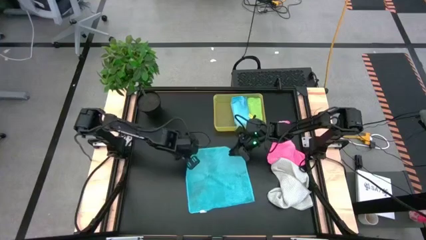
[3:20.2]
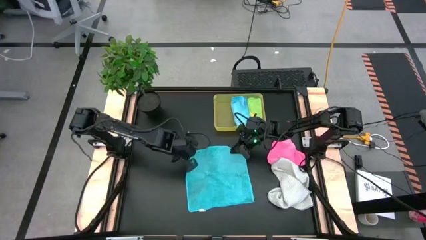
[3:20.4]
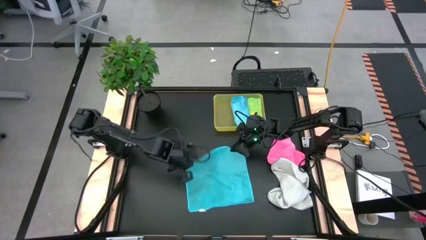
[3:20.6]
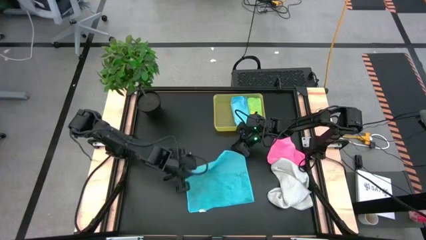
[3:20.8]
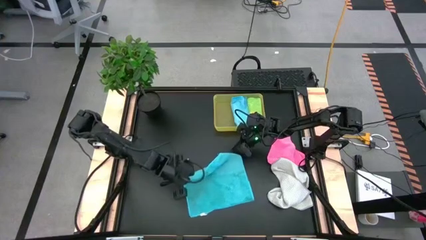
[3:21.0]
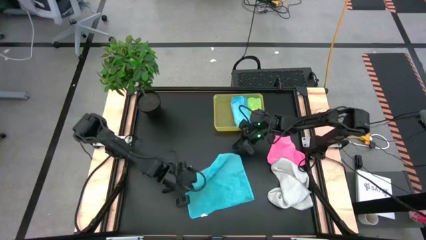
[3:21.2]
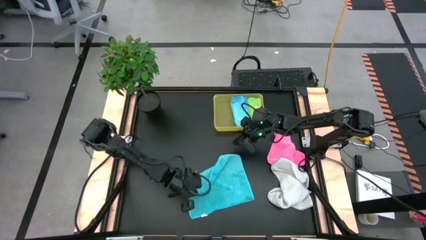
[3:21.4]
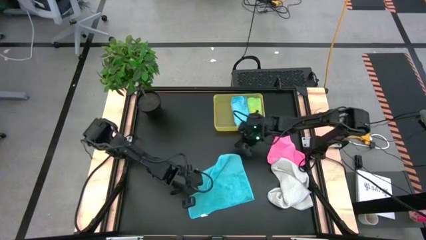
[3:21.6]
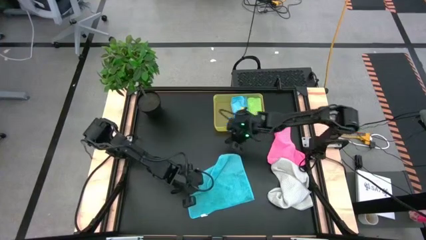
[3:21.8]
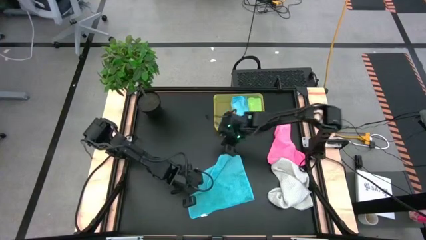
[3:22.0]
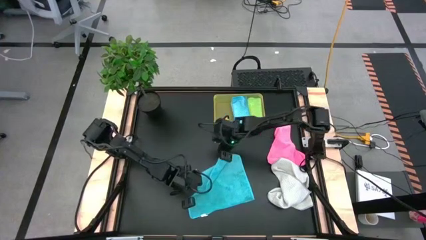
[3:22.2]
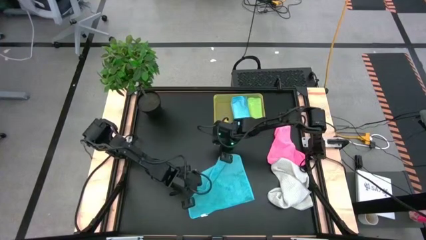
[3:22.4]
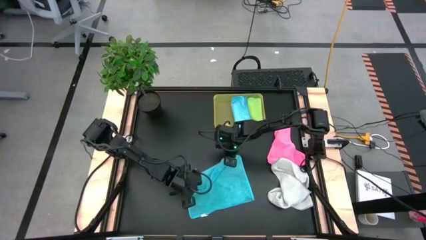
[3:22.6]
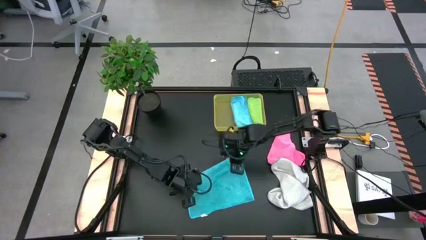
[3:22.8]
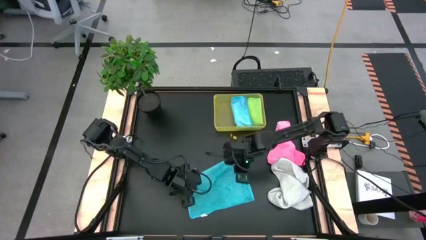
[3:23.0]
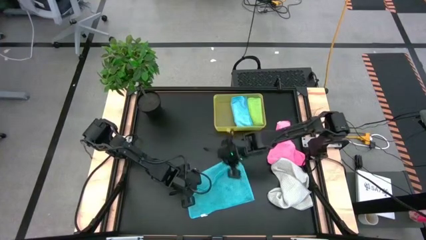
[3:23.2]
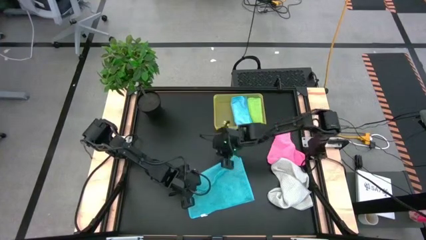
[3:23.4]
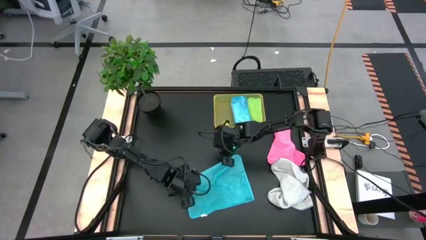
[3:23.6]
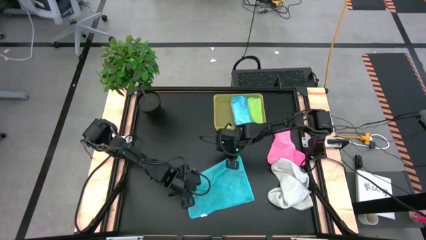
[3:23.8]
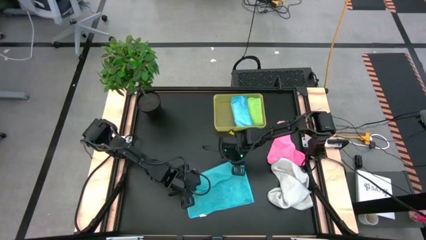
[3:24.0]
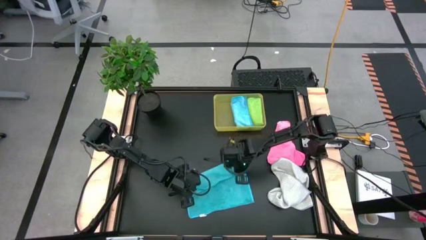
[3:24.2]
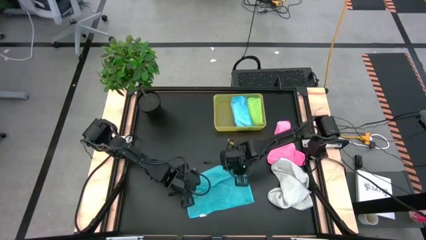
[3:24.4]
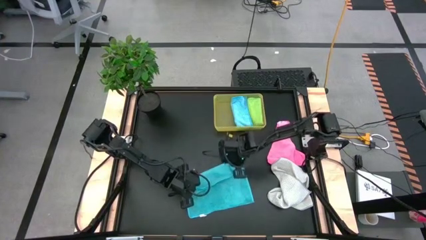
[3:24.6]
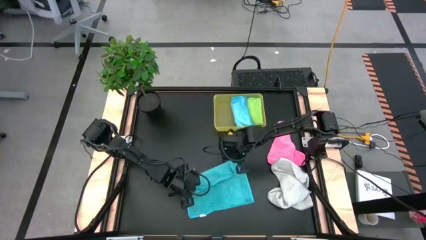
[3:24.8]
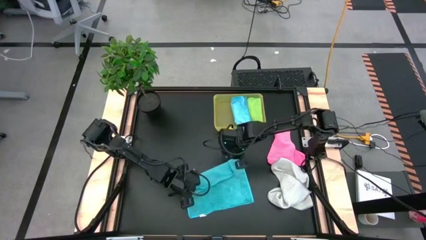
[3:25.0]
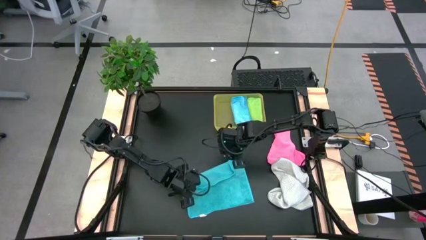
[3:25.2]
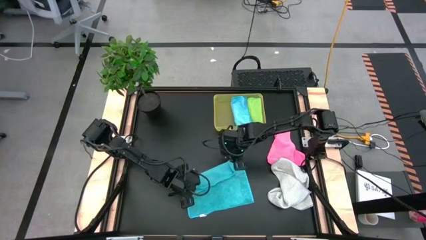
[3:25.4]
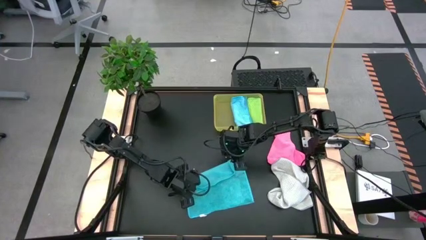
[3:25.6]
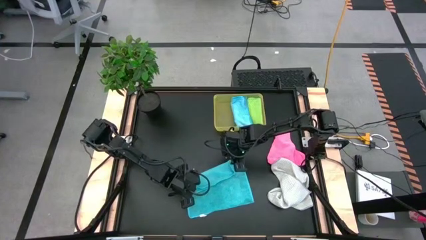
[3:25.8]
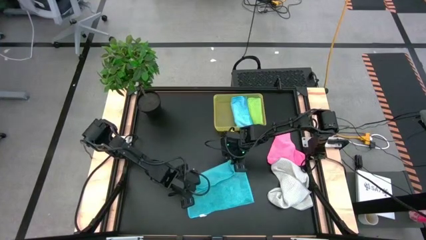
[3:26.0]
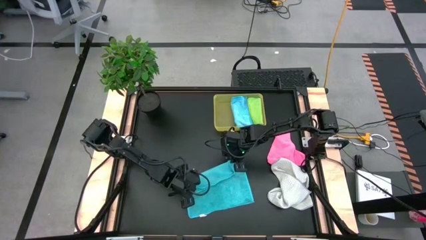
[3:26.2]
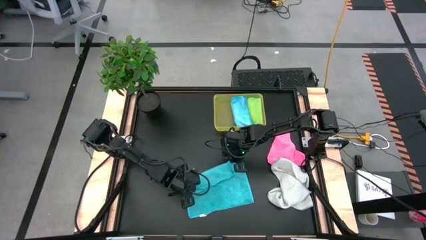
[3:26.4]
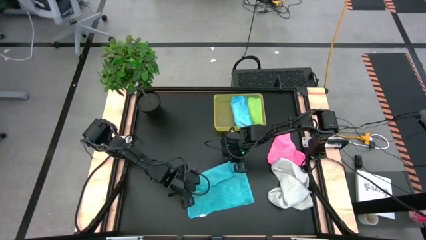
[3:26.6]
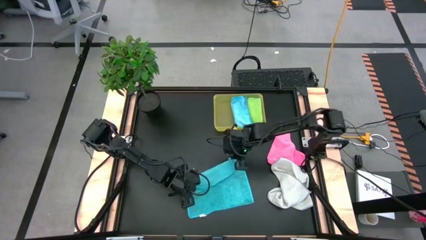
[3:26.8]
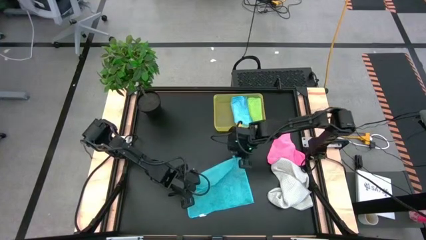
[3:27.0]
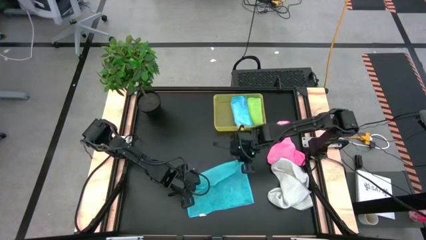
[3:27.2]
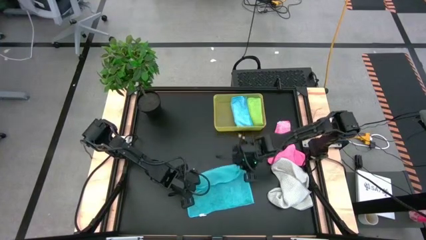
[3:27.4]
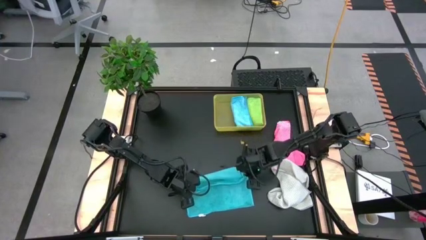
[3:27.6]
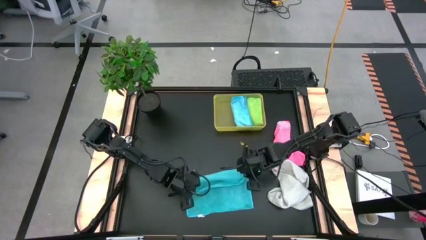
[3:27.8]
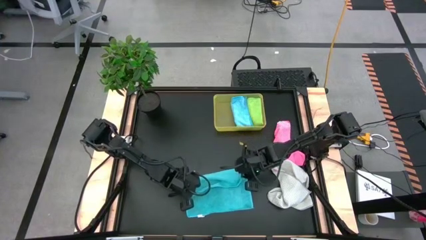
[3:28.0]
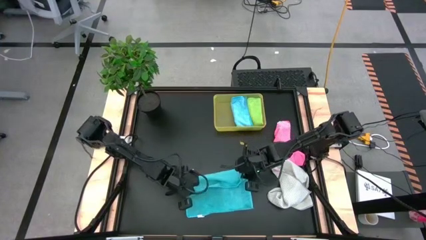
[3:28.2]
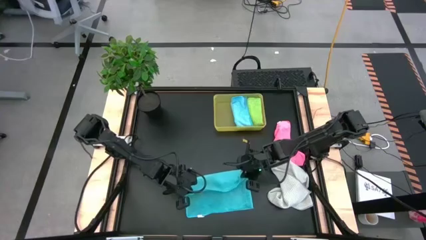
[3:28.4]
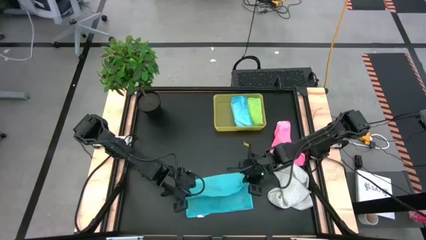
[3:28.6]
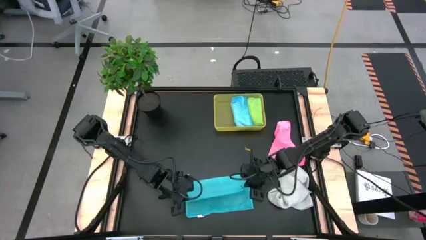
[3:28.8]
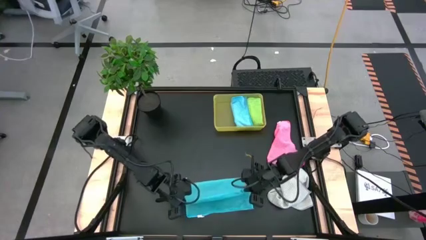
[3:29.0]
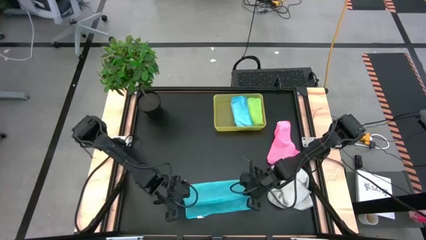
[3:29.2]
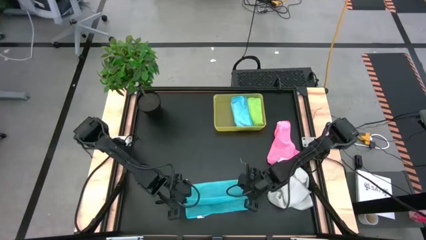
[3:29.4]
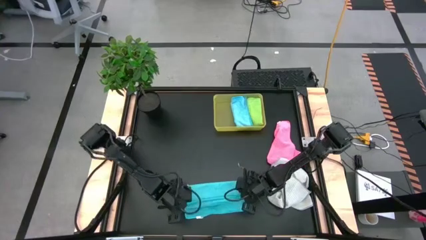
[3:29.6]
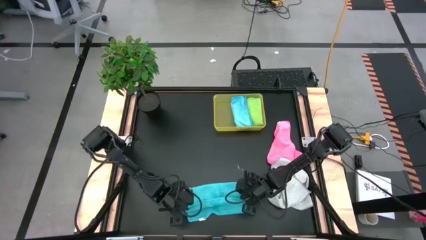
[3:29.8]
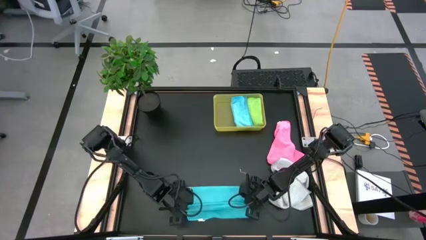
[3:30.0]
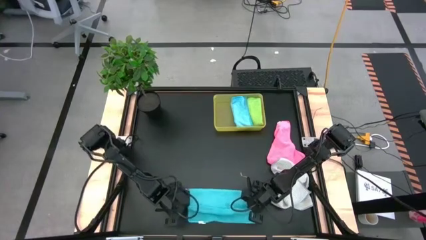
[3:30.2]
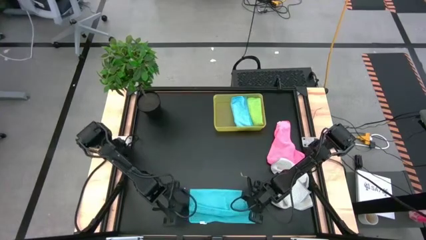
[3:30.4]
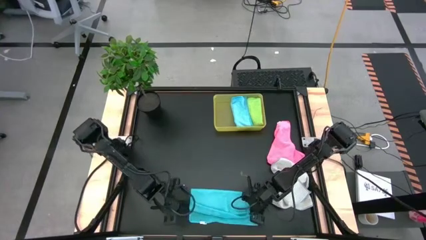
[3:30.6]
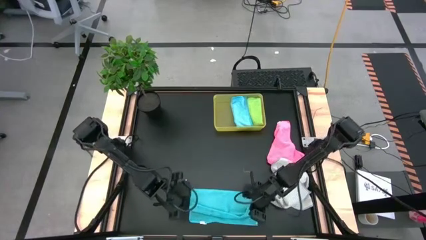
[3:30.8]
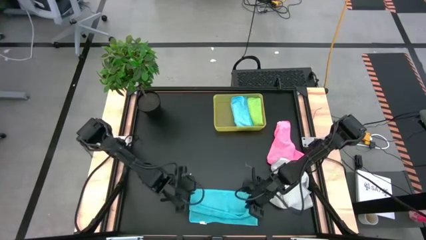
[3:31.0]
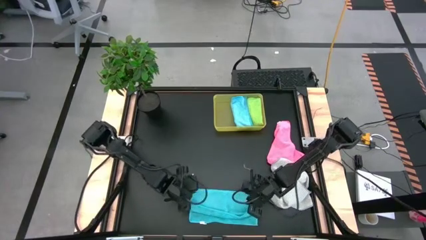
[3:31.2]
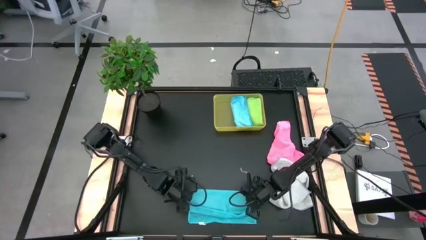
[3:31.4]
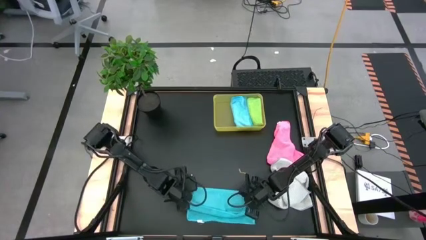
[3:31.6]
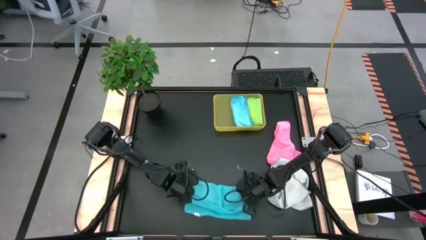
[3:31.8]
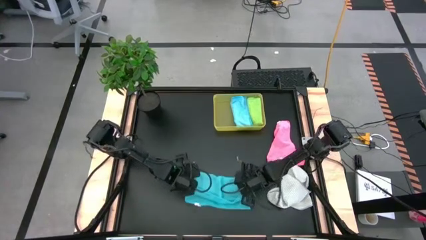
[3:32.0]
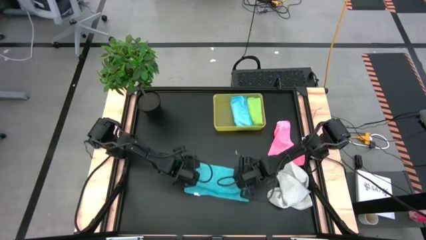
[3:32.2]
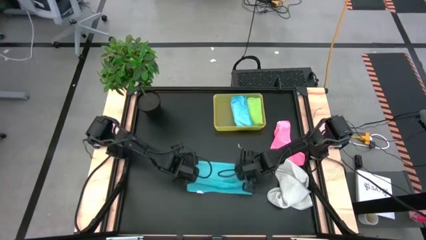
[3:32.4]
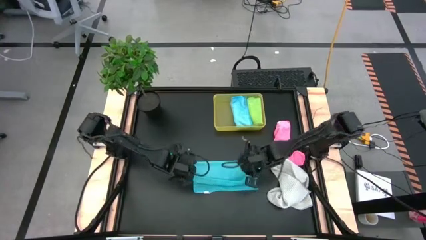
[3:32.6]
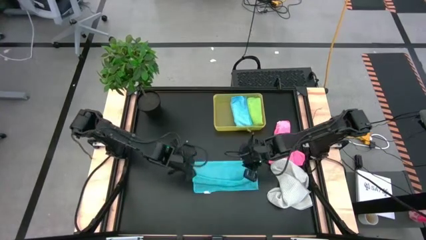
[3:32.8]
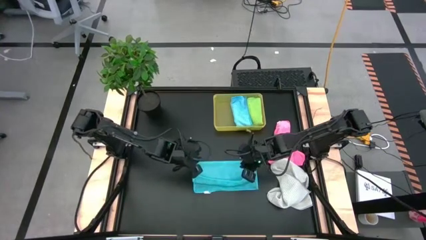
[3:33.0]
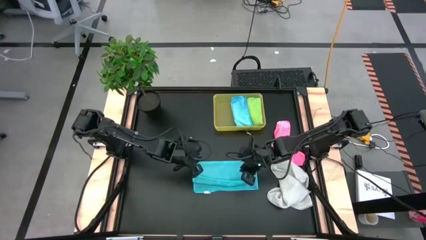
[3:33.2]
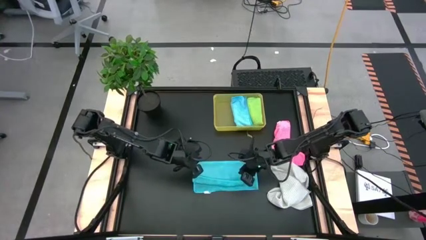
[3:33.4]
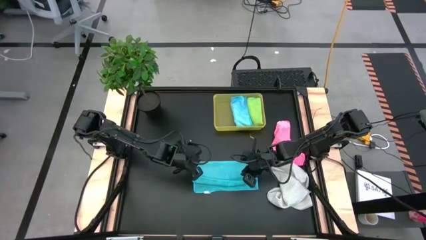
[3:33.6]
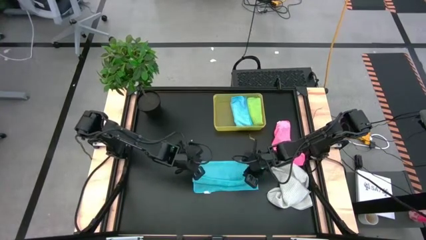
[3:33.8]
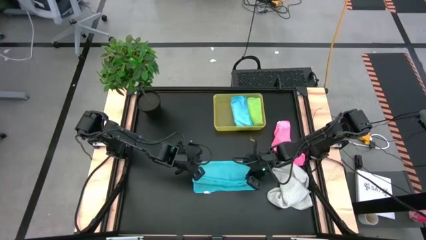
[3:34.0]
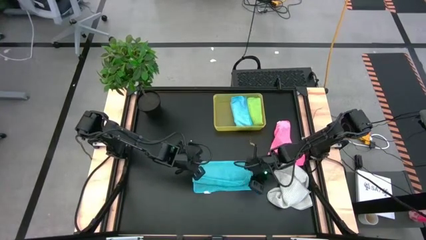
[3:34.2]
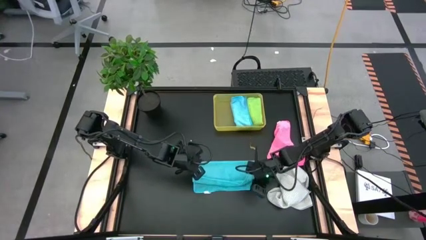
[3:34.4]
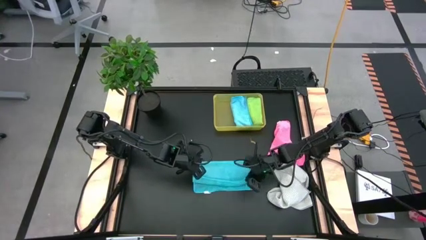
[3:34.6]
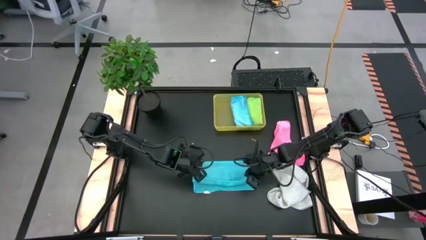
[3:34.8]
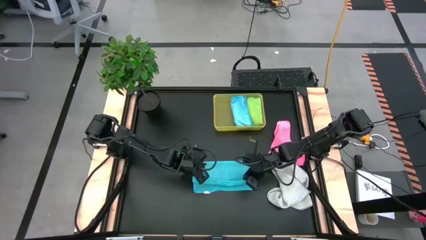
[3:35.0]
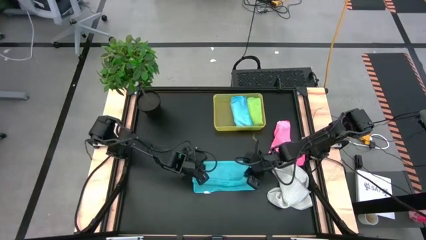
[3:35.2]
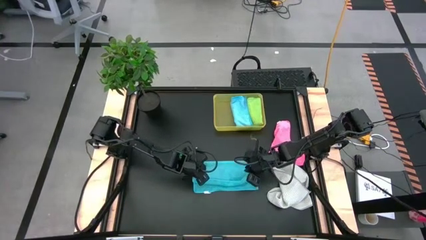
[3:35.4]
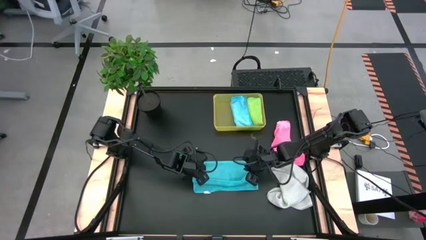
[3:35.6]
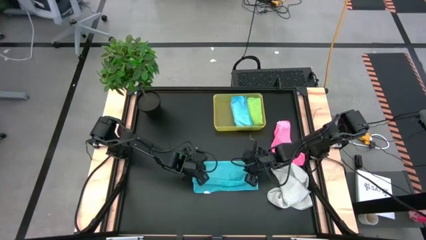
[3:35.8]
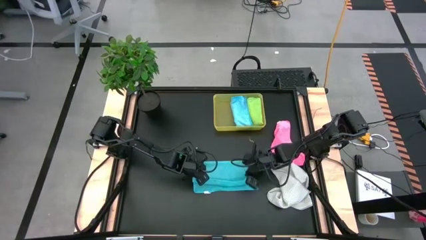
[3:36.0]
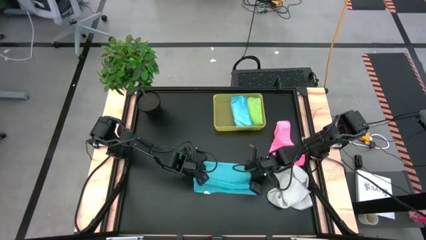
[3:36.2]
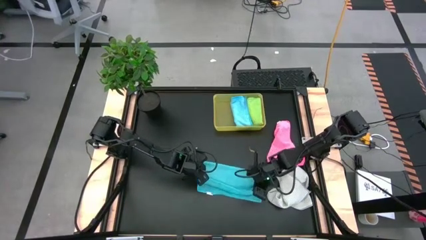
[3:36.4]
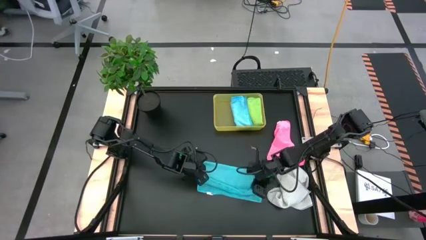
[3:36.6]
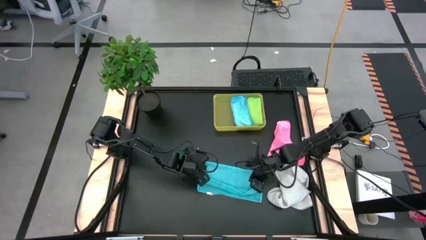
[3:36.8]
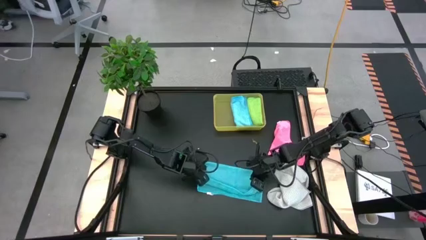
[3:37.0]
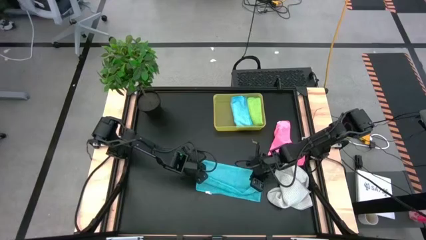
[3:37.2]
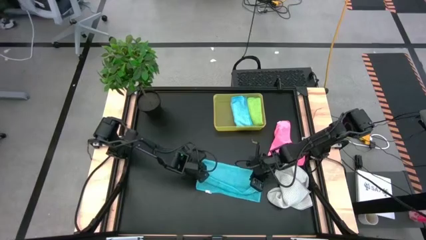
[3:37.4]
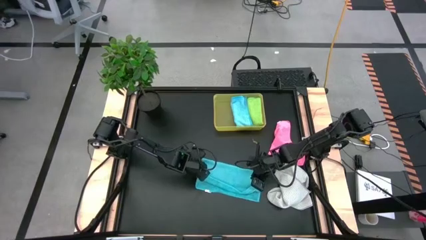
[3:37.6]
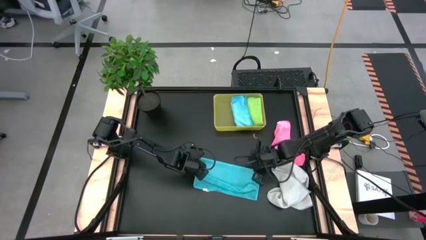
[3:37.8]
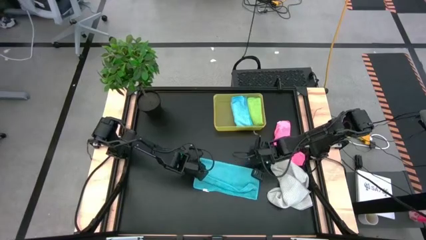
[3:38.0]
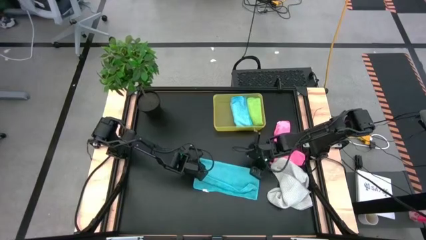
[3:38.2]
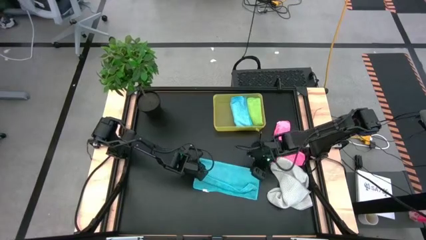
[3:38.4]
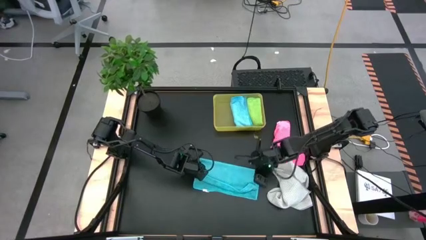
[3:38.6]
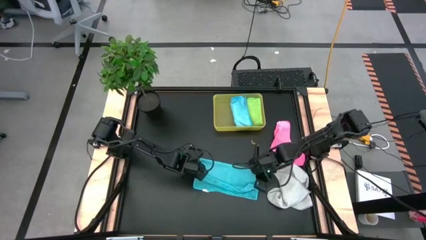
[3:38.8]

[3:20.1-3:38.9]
Task: Fold microfiber towels
Fold the blue microfiber cloth
